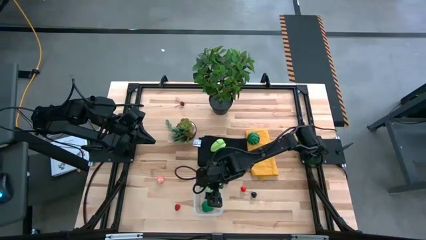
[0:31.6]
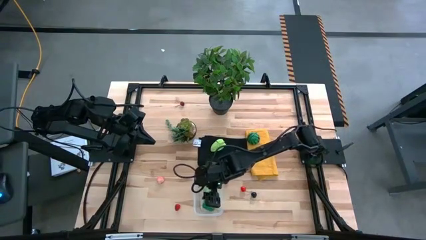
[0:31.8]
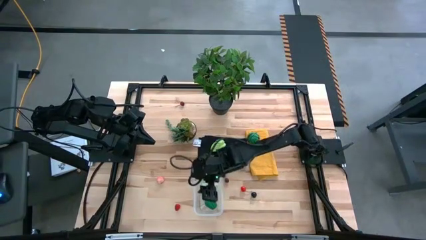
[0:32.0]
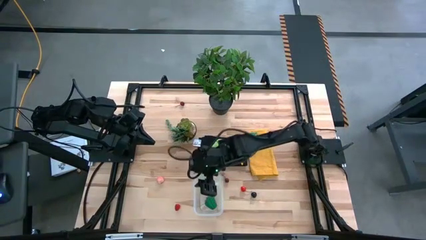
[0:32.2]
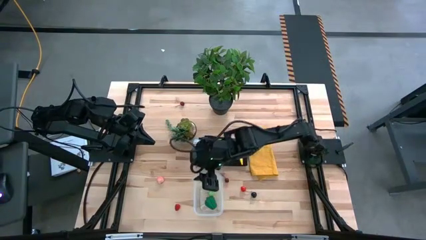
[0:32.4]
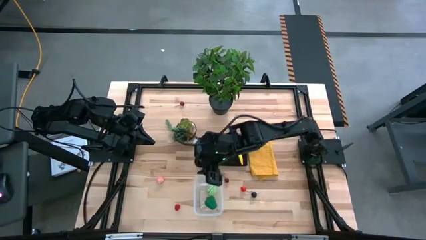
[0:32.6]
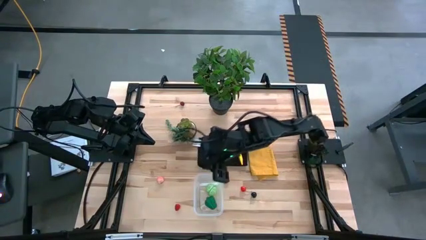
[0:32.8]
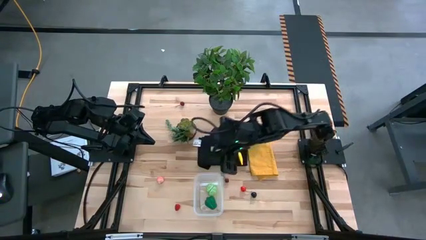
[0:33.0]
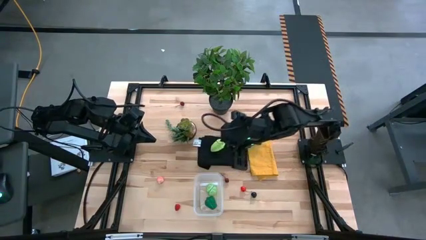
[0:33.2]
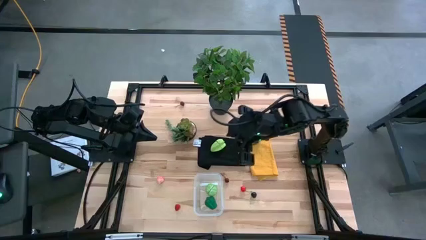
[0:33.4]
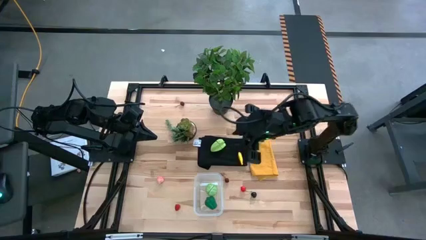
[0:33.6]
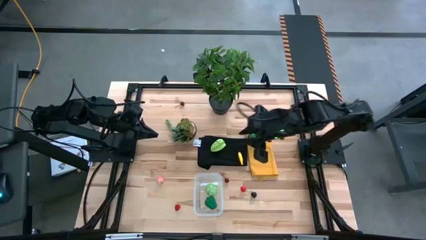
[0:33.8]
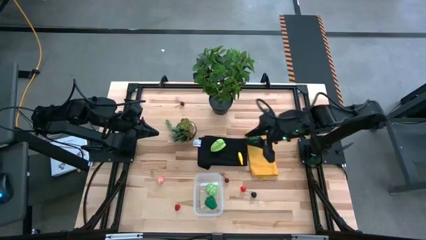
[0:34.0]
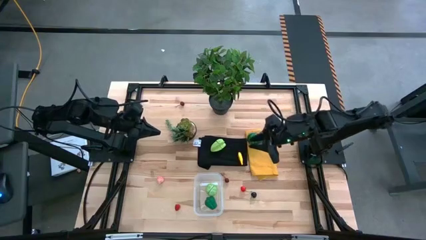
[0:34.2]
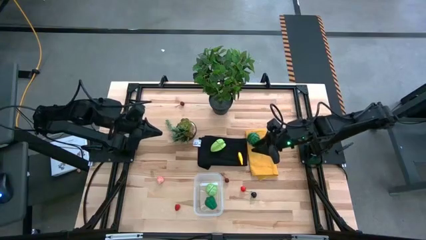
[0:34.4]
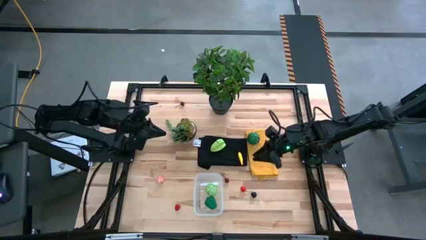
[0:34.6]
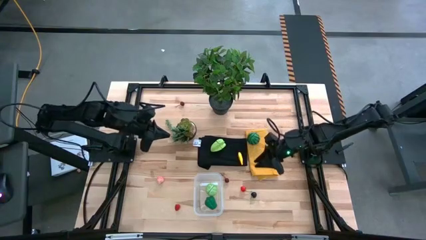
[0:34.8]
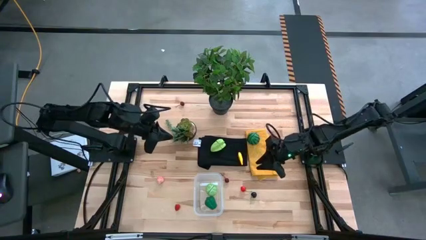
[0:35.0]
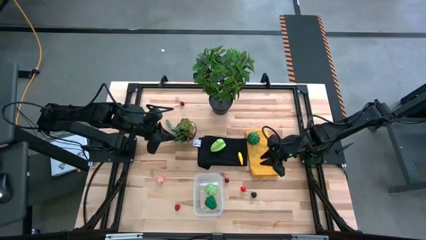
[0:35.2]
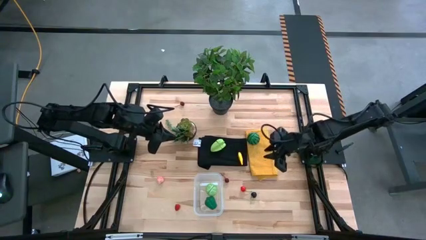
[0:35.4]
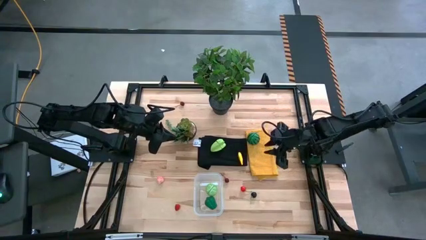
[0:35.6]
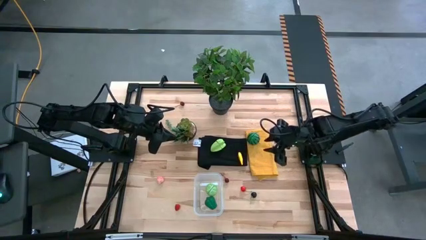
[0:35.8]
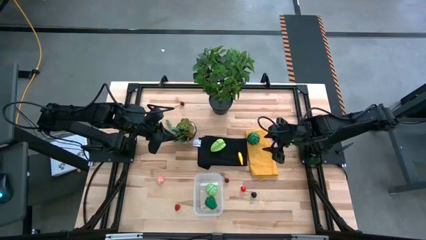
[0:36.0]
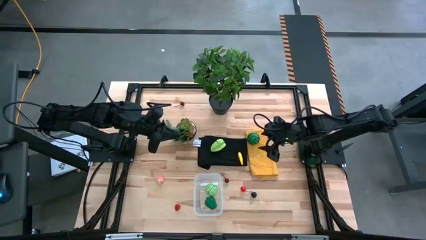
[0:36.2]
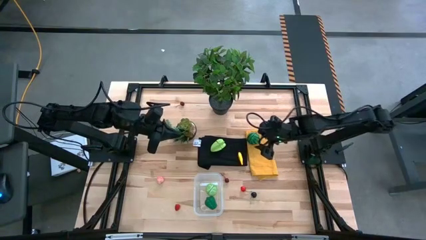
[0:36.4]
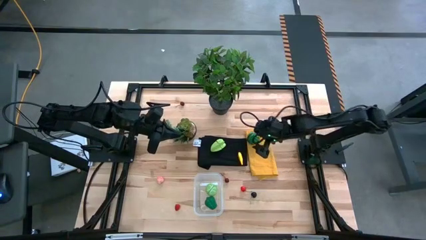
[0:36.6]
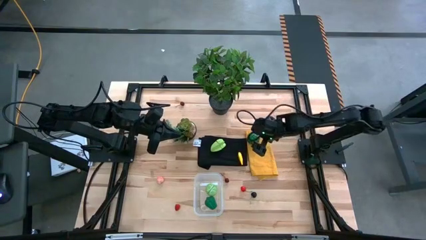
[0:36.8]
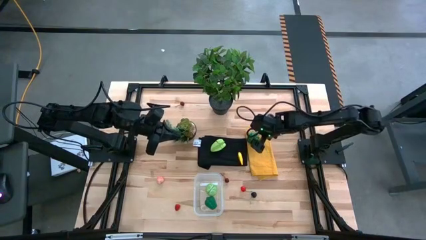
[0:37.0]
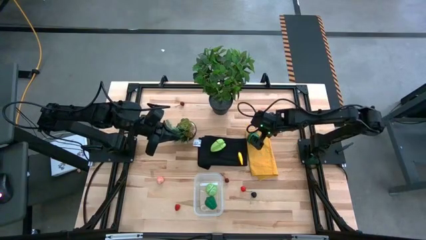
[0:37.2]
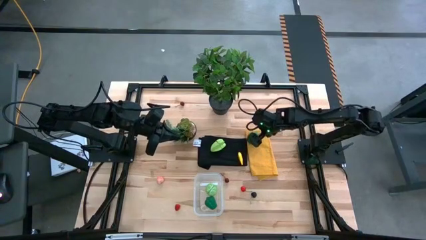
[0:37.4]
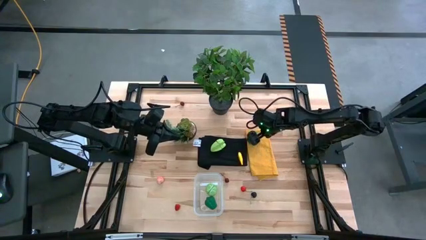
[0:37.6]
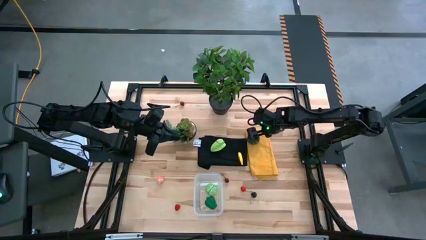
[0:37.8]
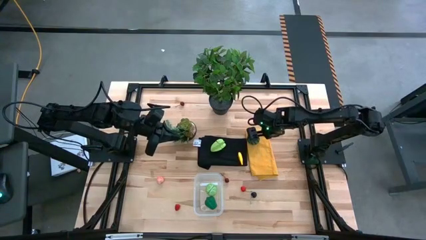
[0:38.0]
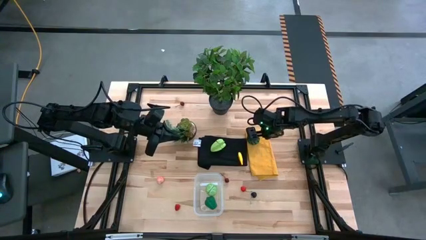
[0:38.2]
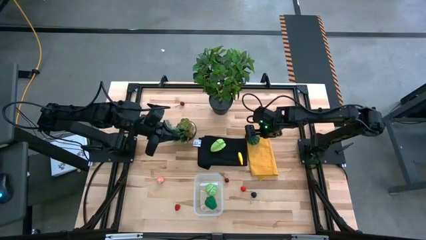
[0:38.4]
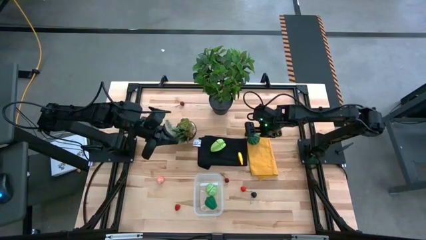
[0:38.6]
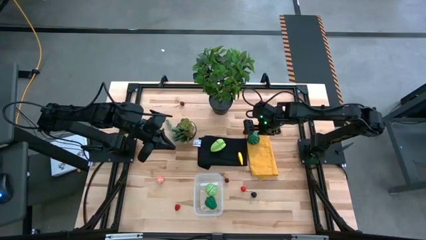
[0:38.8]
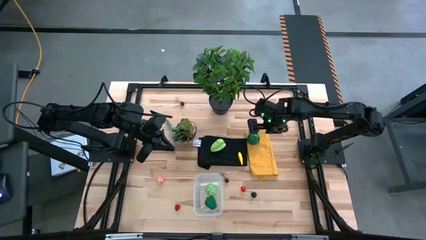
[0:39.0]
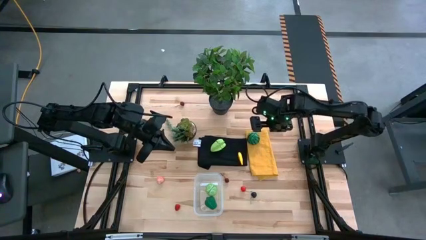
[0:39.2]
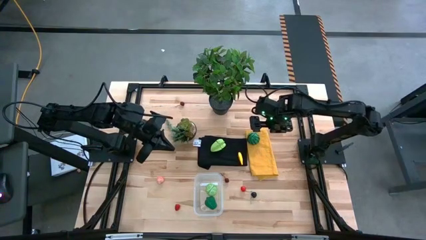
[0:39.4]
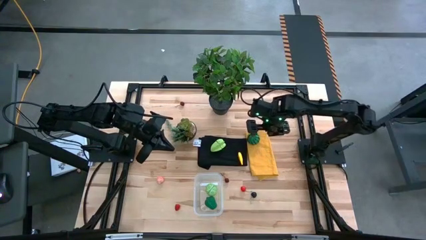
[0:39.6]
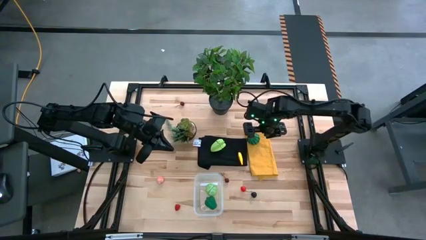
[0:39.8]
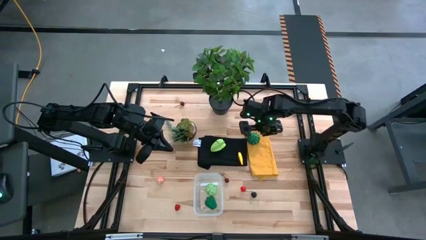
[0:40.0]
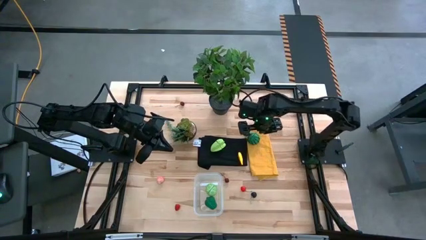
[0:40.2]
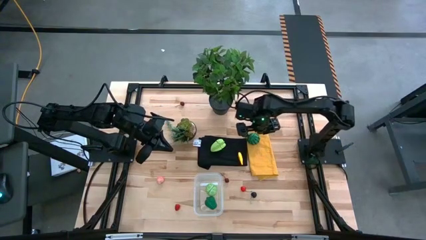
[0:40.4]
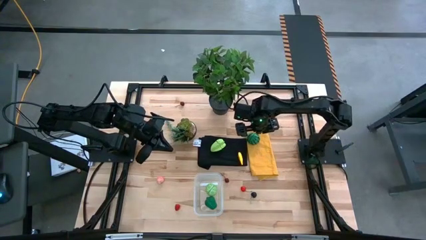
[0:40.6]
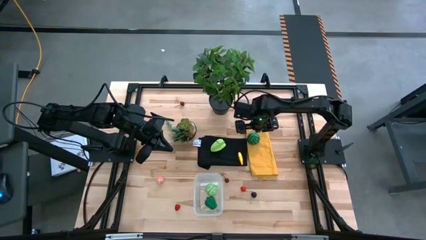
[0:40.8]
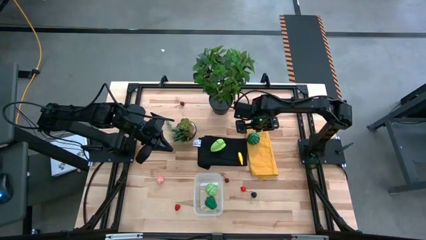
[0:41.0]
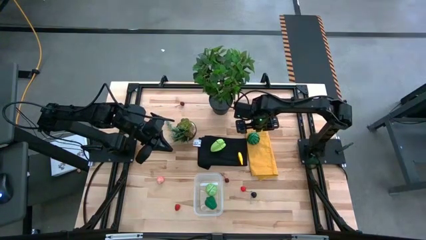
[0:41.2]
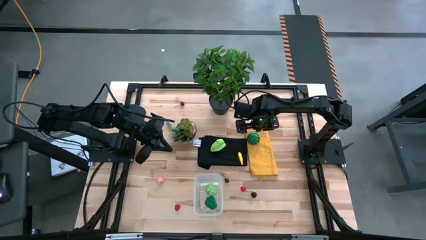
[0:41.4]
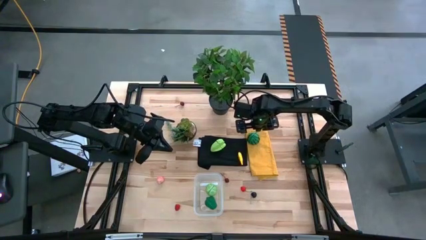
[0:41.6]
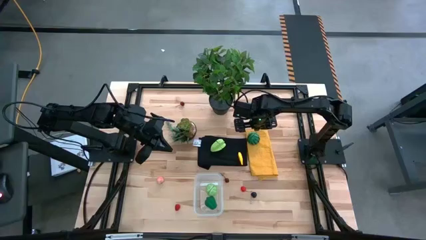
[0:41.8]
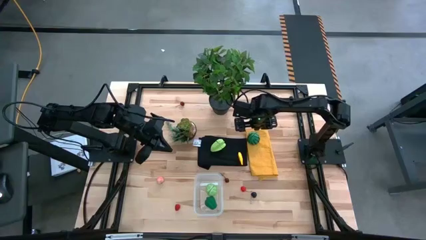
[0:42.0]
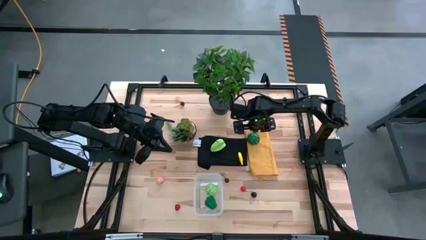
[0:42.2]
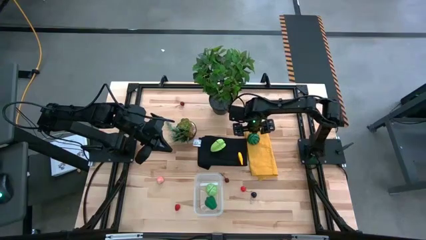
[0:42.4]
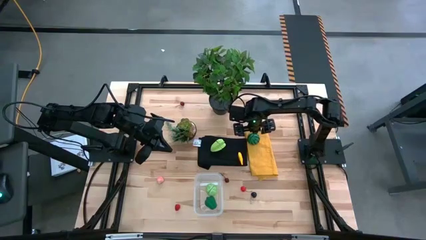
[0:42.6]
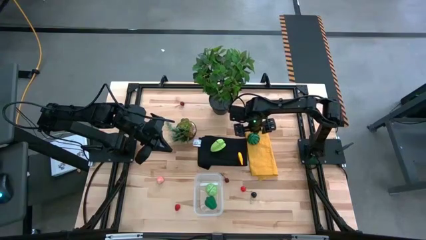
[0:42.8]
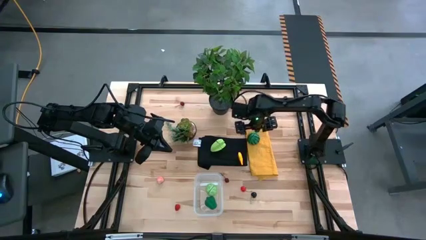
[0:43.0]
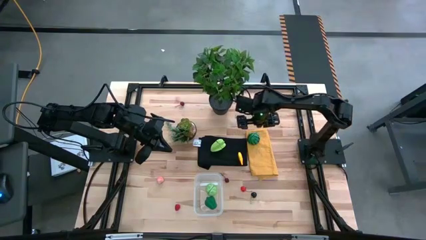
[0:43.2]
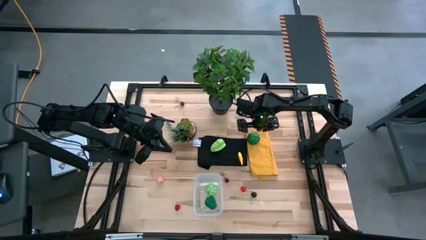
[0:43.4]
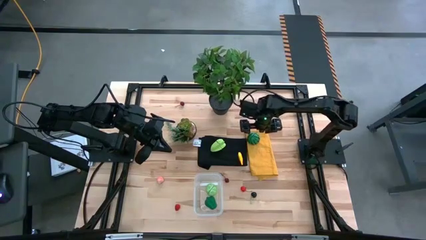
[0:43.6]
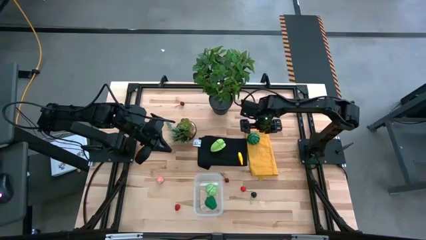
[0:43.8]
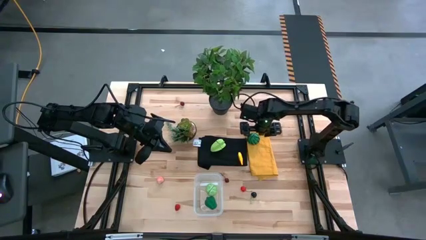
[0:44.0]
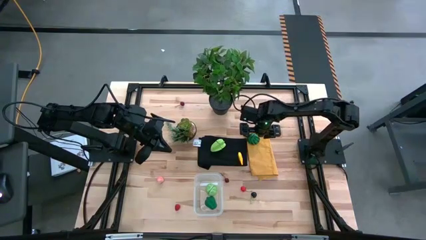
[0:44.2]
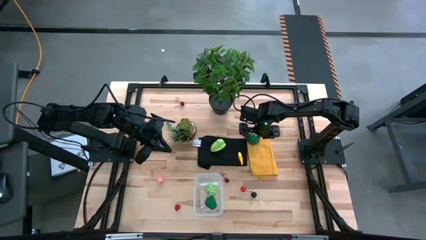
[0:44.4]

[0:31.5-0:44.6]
Task: Pick and placing Produce into tupperware
Put the watermelon into the bin
